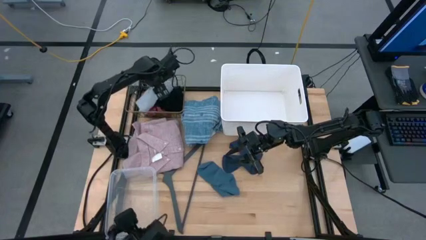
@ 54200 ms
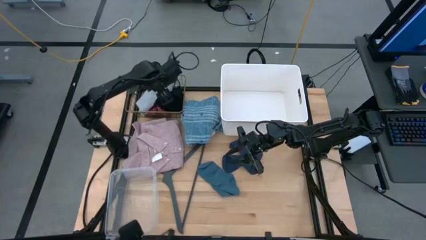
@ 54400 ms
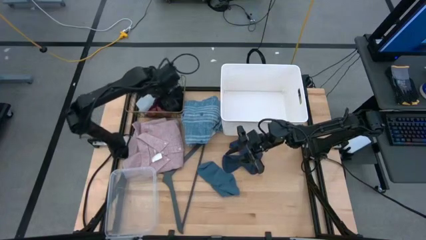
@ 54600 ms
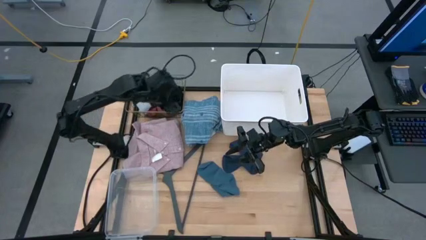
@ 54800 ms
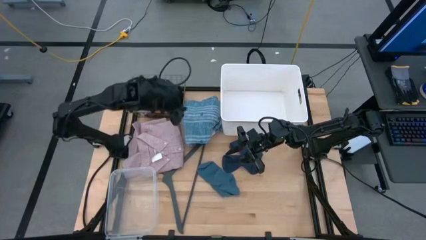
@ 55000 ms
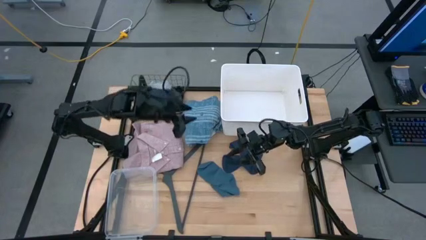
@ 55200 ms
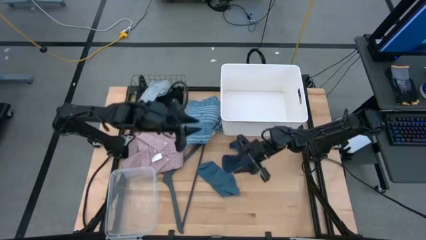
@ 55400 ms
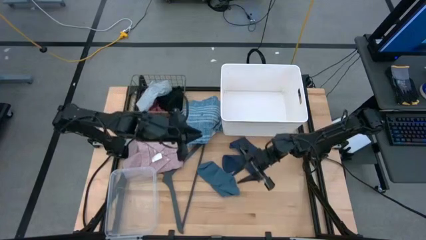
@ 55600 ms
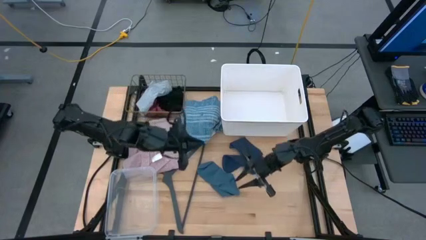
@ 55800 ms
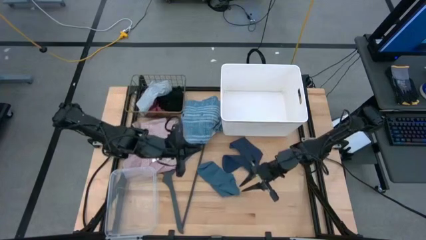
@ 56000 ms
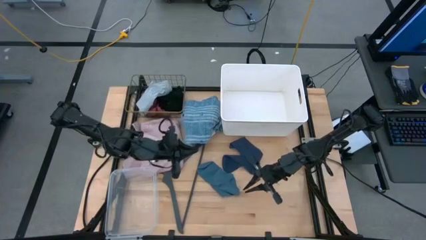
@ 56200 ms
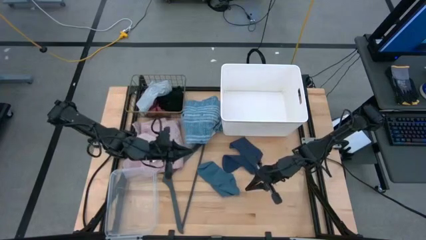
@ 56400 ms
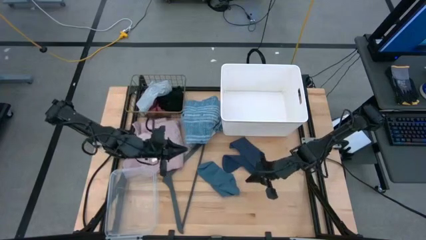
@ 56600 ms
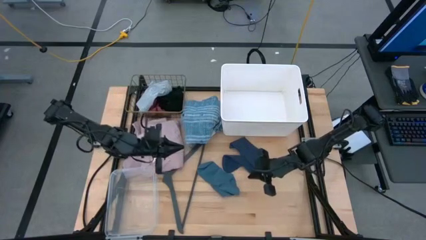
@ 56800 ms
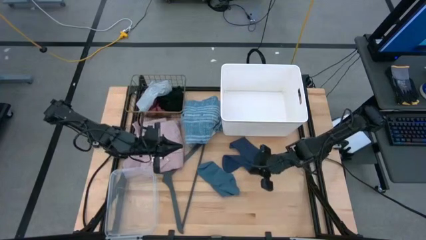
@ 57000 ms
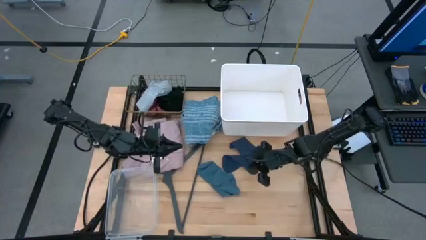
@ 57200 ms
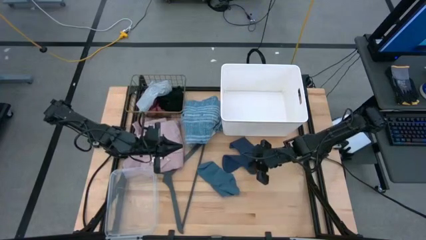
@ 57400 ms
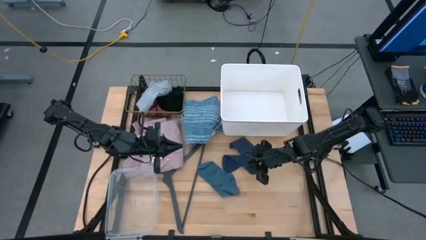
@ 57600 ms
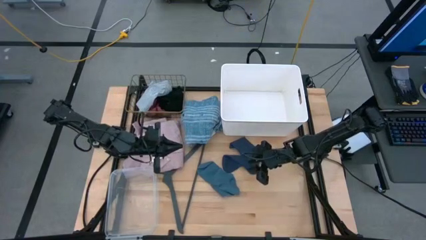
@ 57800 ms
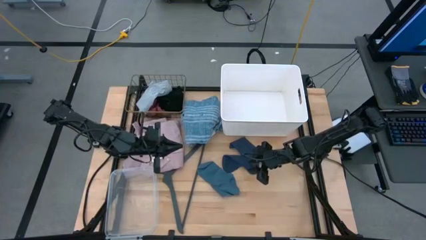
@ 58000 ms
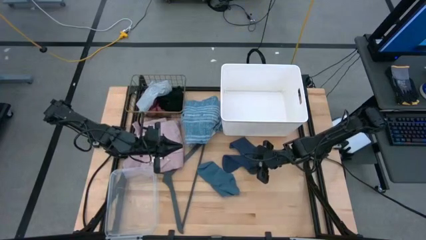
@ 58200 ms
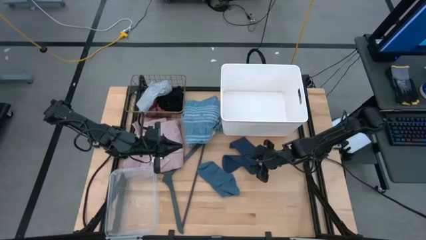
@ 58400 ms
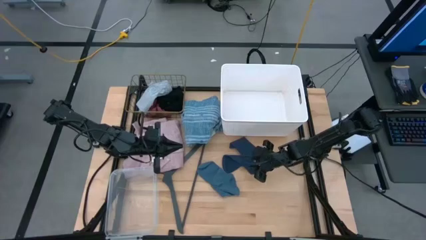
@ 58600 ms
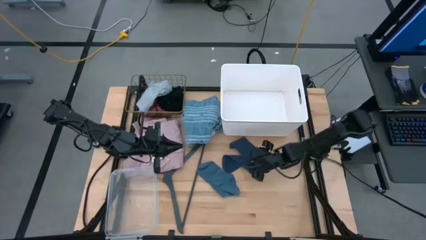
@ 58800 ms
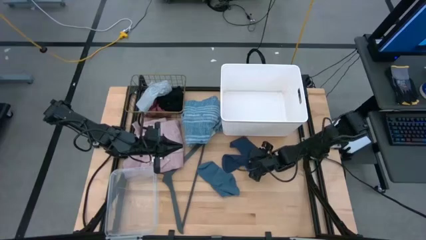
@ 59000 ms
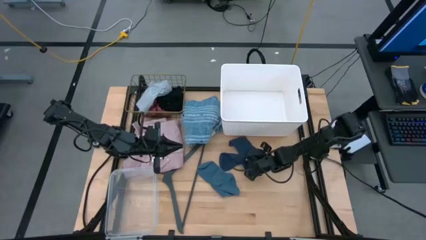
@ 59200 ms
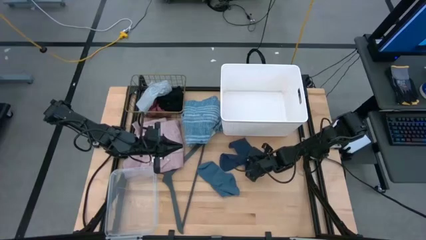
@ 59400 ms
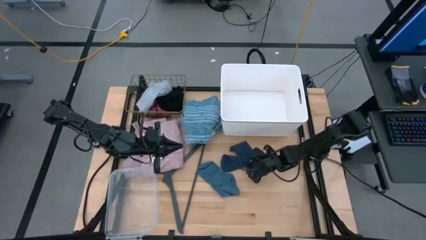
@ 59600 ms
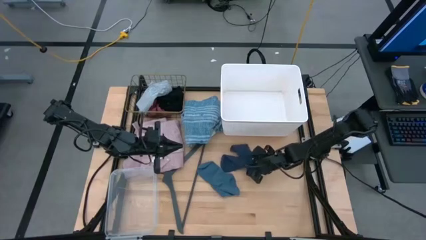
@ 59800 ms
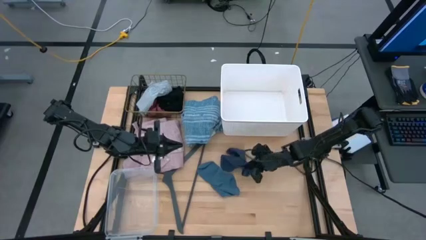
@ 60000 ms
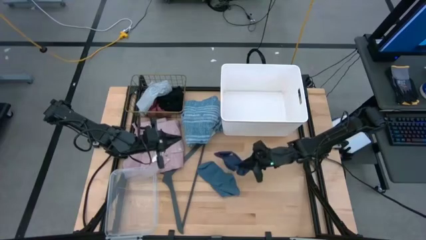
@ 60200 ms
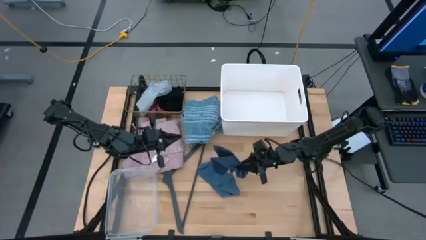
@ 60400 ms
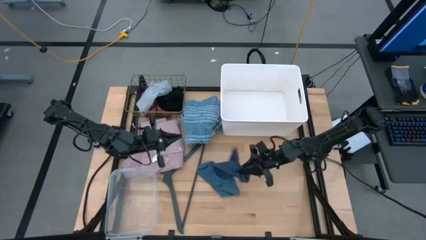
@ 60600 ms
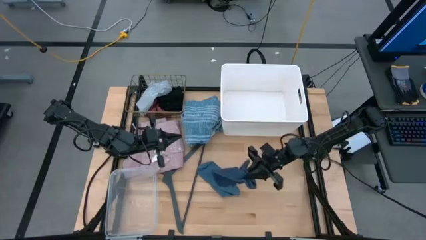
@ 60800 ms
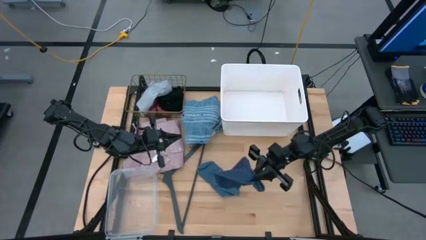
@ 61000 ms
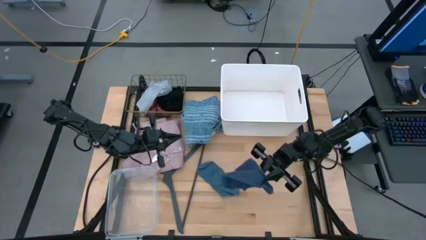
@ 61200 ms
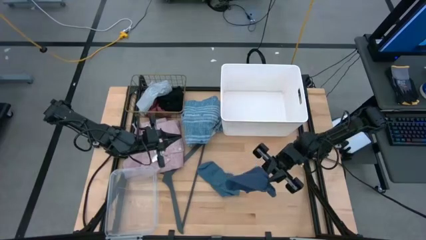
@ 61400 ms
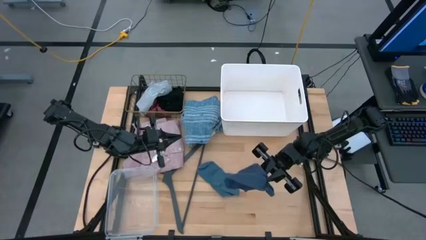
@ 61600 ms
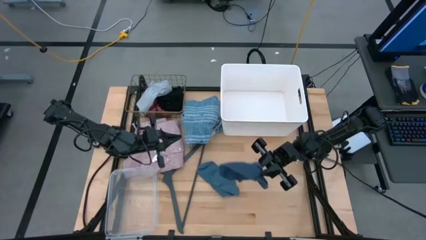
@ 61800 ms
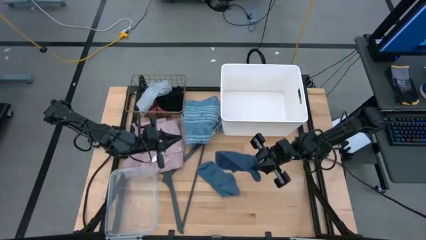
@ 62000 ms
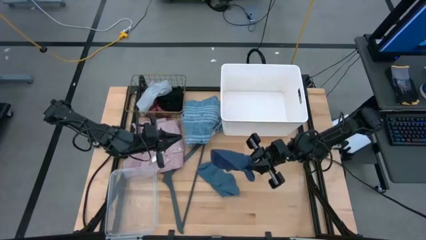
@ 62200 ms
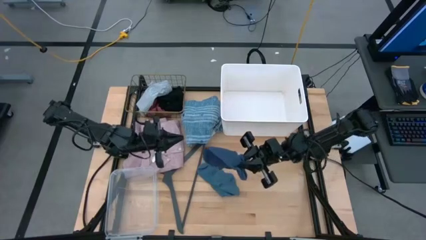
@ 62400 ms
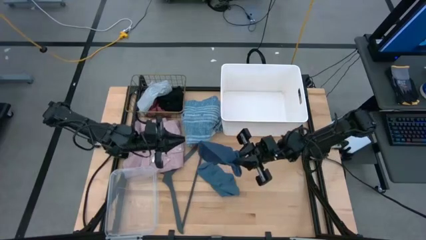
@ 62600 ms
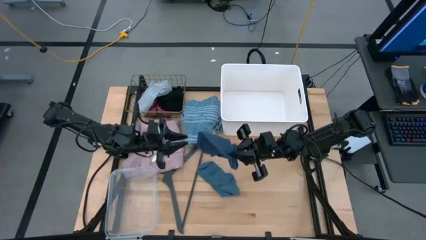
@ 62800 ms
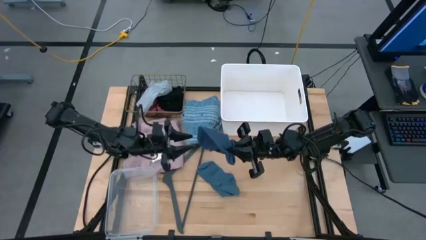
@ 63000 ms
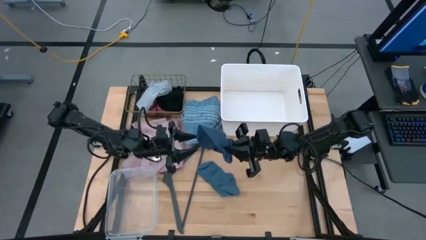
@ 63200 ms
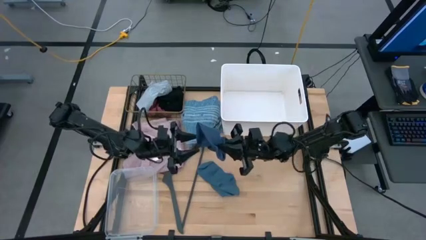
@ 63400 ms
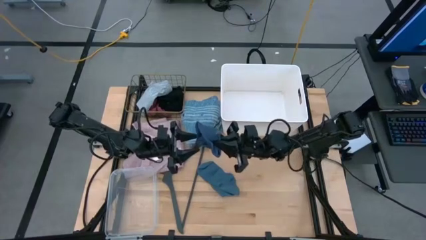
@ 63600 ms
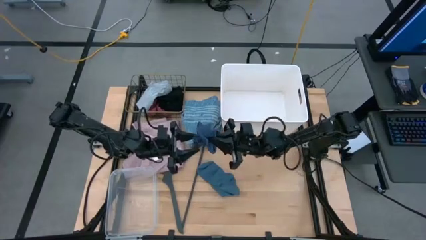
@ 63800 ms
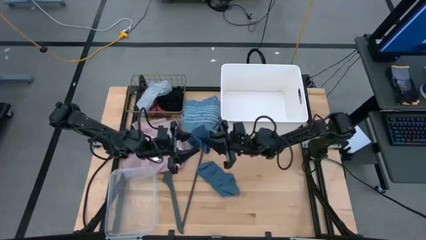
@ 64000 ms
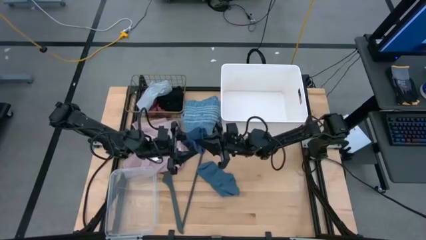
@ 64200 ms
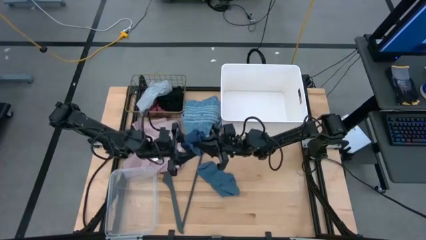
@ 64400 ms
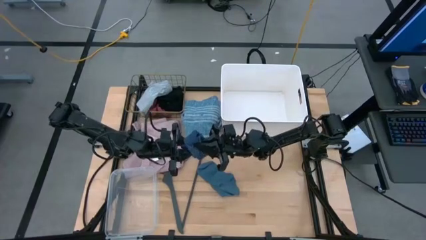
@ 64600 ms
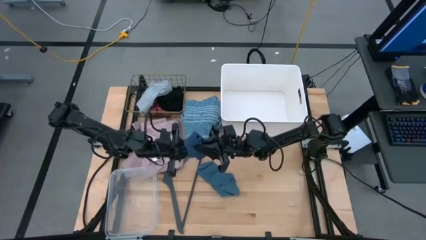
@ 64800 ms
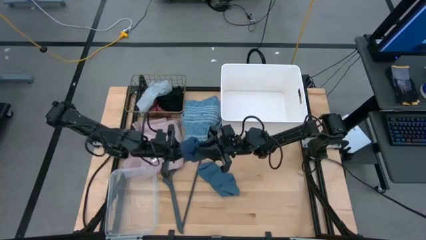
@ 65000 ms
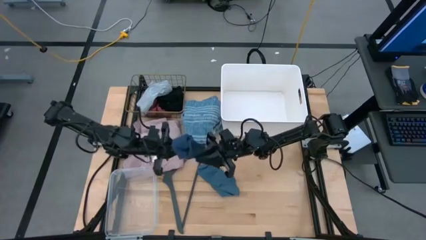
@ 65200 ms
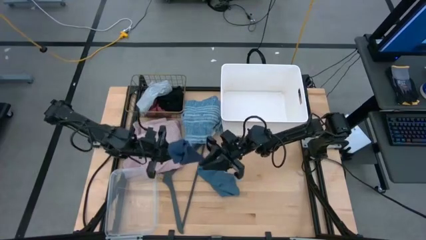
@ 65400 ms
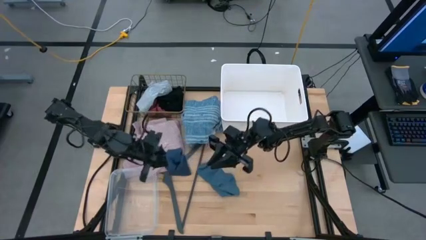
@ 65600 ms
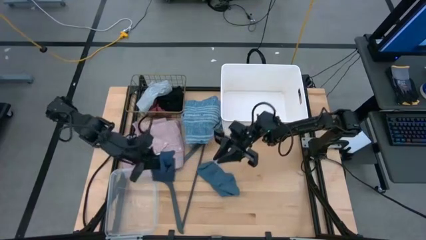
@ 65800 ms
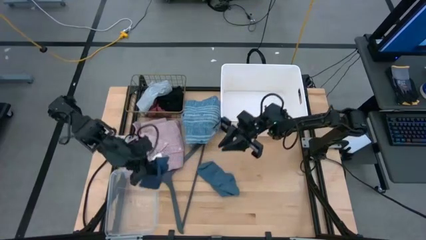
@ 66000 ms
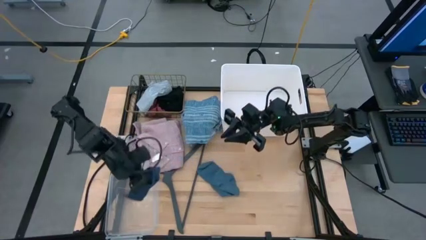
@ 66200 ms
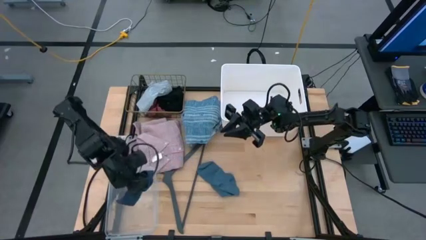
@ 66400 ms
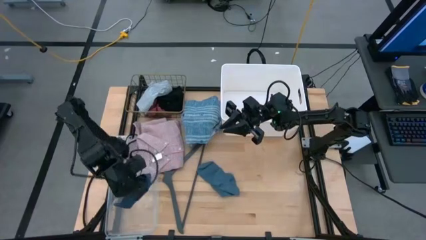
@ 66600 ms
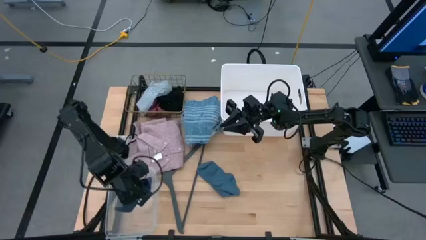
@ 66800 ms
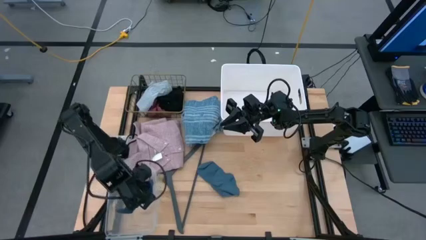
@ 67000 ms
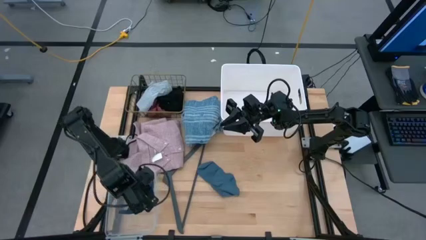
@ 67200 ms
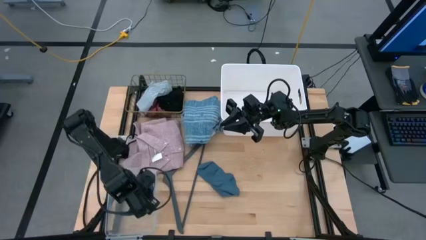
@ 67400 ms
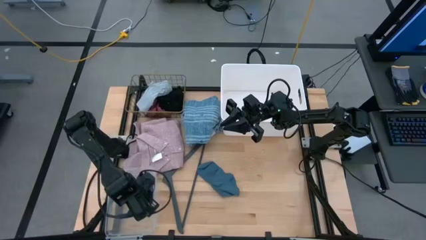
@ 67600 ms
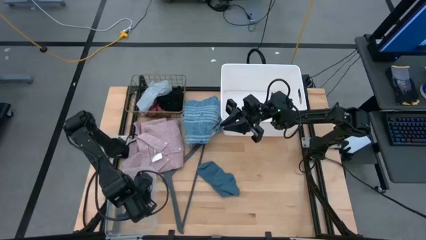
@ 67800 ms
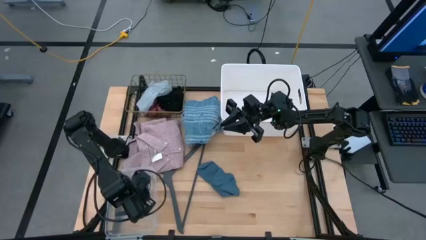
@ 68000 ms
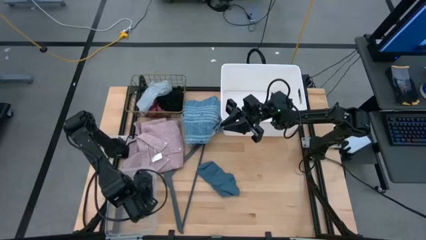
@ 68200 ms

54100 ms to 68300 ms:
Task: Pick & Place Cloths
Put the dark blue sock into the transparent bin
